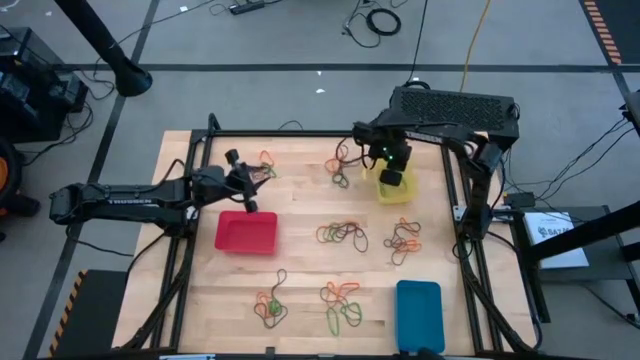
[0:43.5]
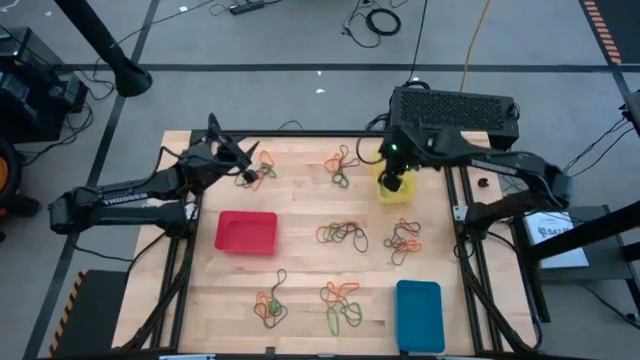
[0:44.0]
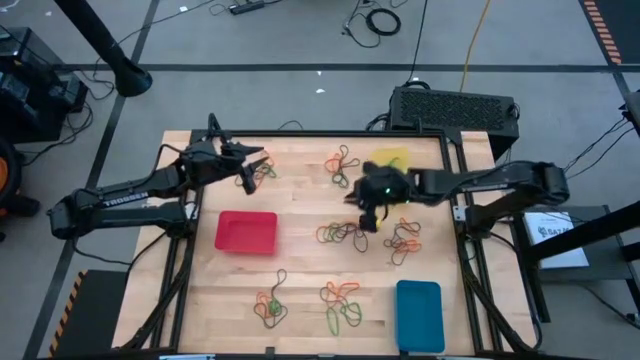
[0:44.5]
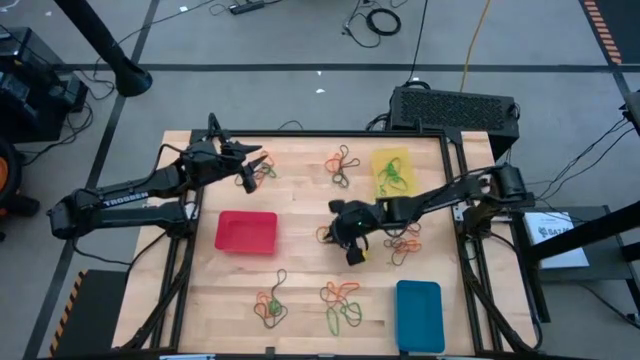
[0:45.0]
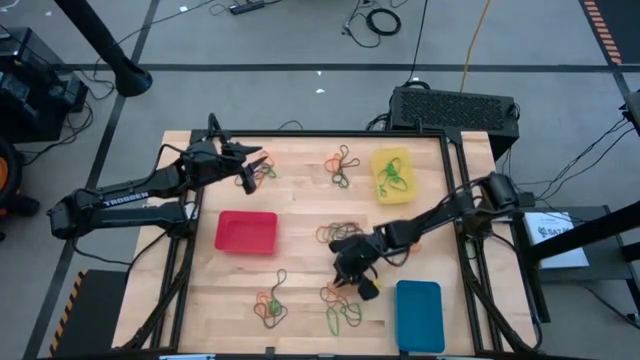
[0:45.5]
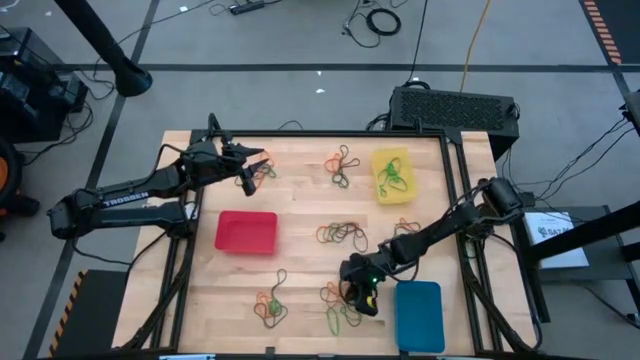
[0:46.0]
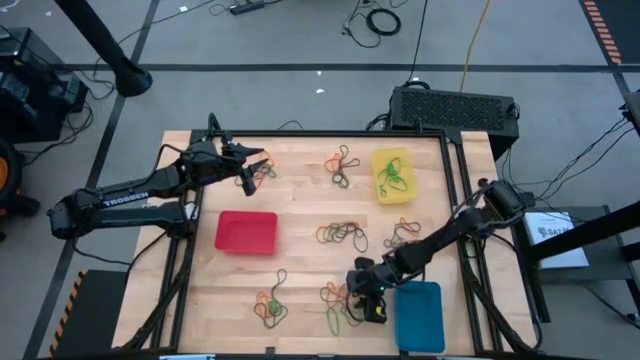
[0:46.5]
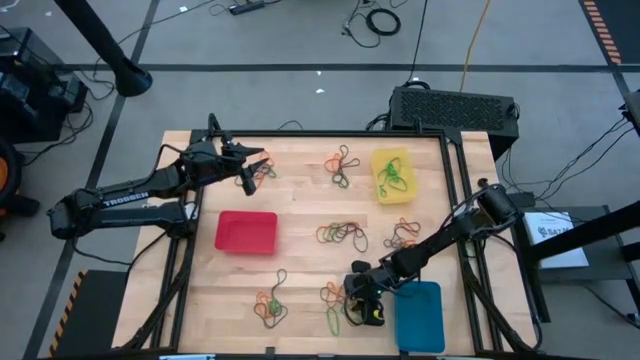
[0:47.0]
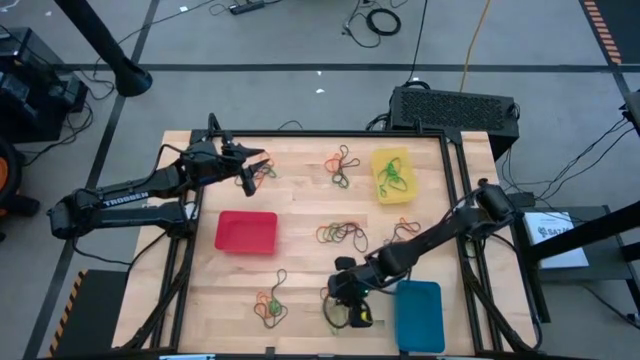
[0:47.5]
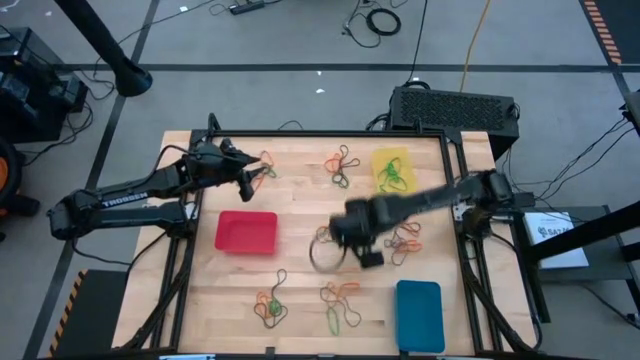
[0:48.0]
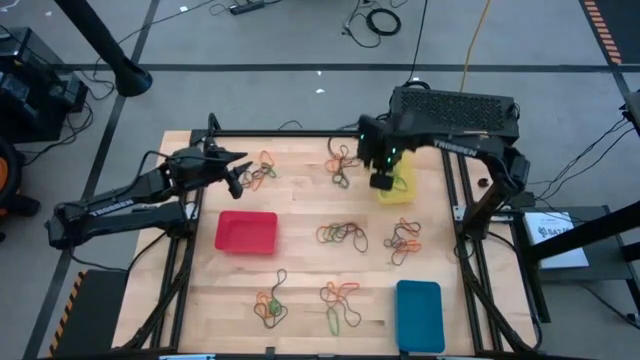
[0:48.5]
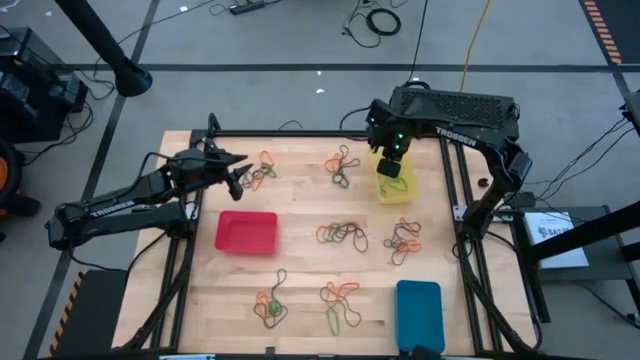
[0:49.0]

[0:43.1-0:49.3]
Task: Sort rubber bands into baskets
Put the green rubber band into the yellow bin

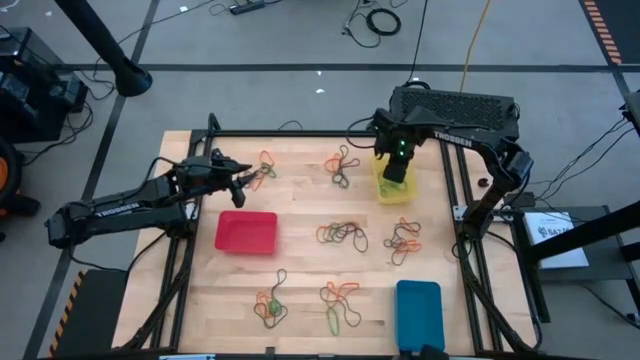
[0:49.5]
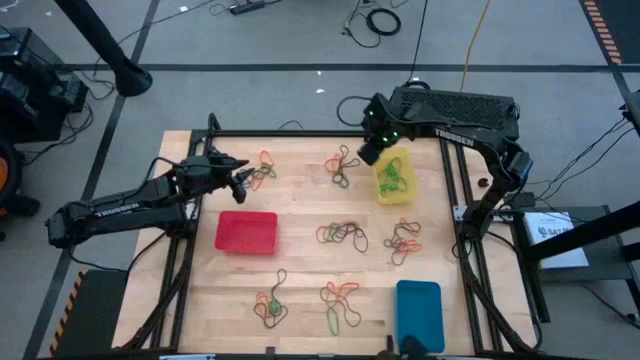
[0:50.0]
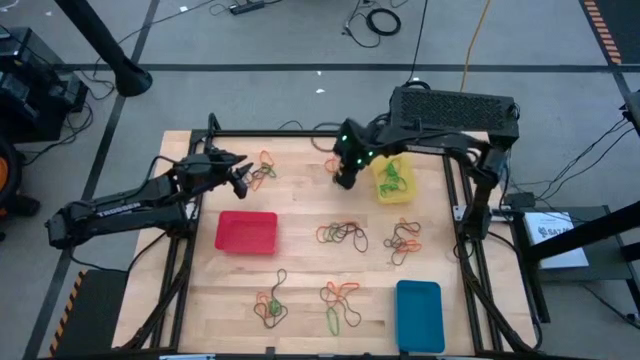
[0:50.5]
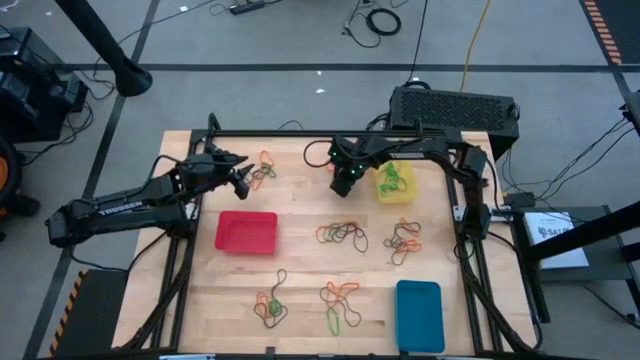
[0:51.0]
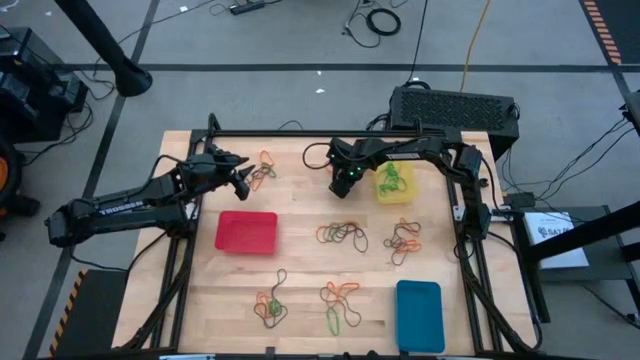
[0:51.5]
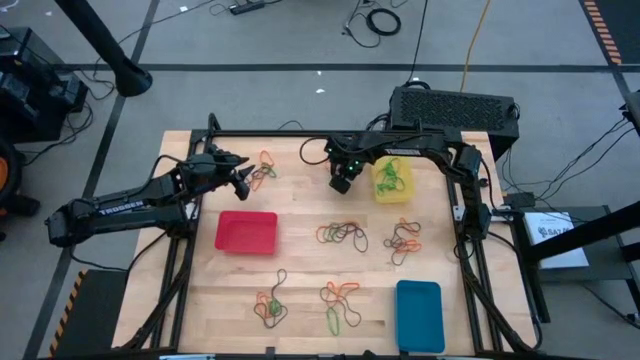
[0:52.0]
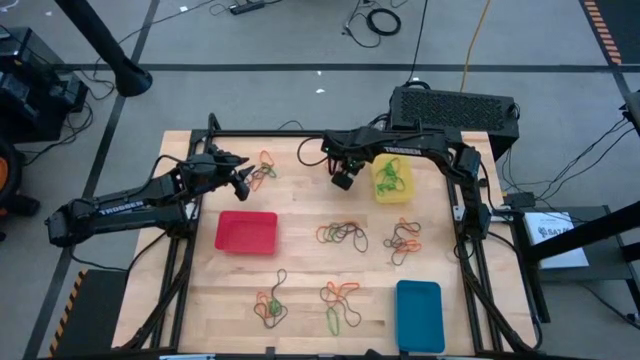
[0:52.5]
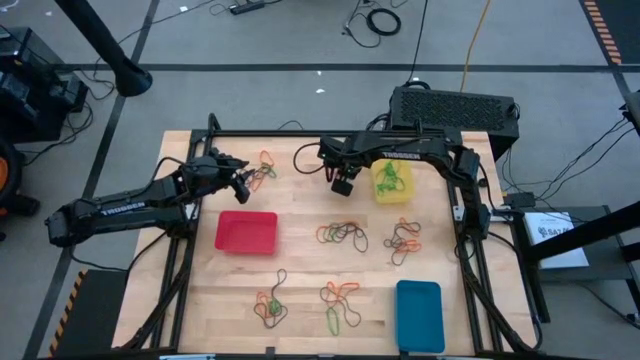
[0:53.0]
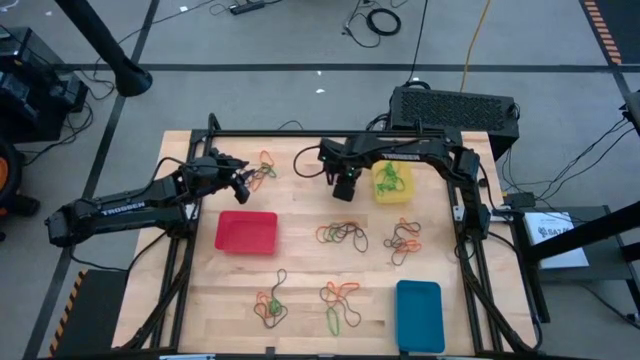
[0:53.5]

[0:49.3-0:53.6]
Put the green rubber band into the yellow bin

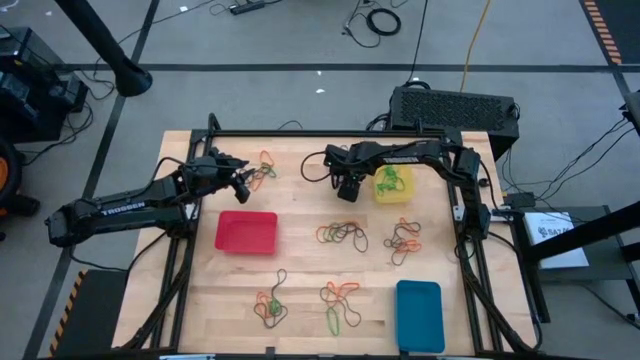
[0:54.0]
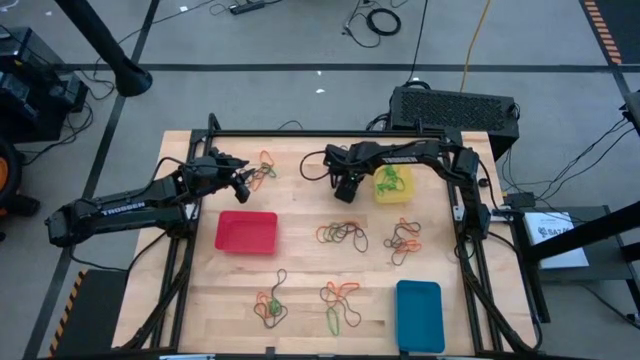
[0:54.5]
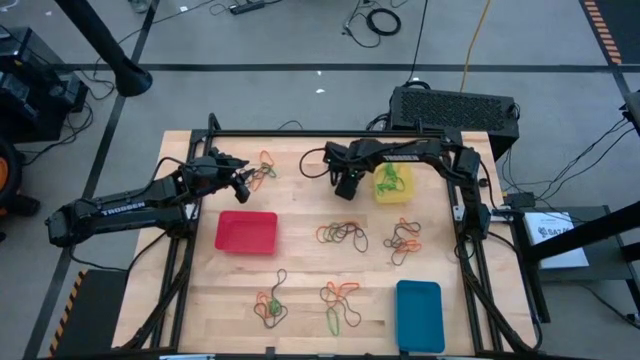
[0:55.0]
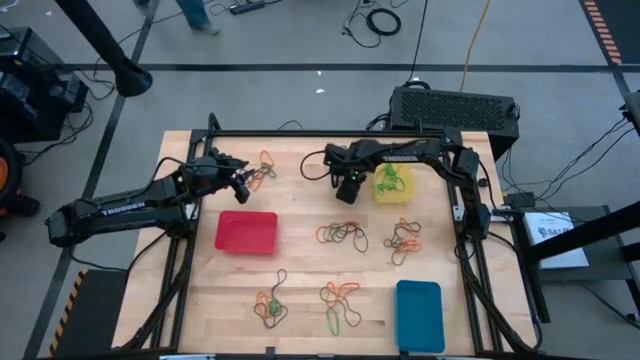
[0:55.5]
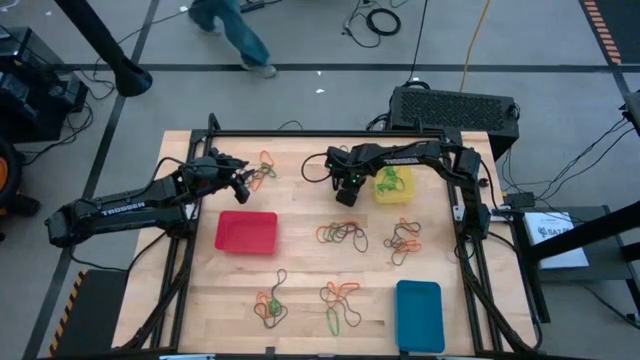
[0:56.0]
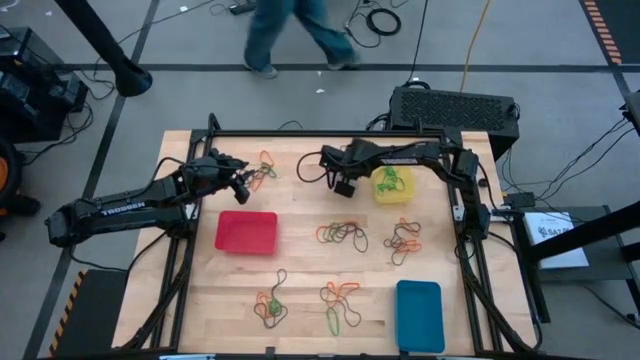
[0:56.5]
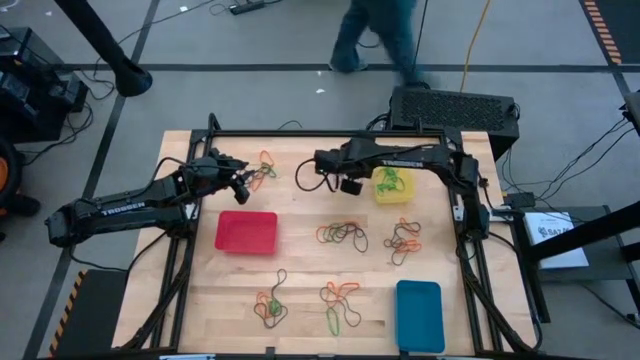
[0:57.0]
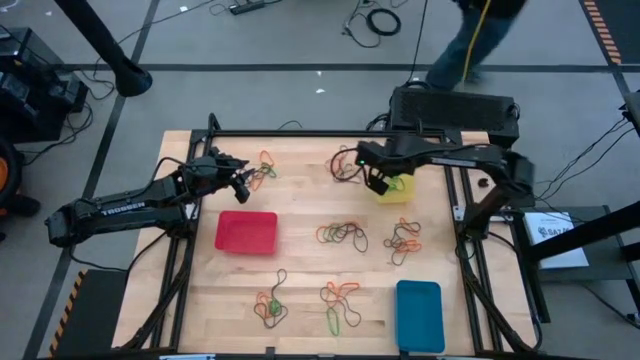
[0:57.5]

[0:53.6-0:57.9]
Put the green rubber band into the yellow bin

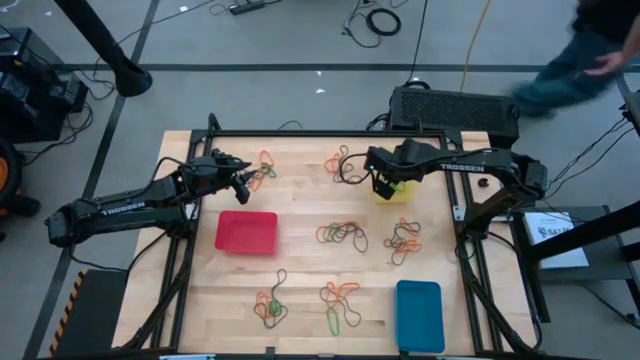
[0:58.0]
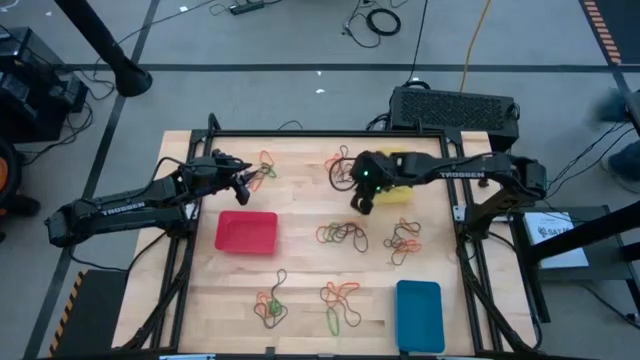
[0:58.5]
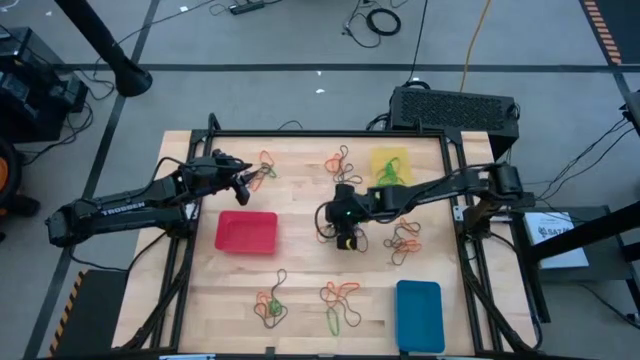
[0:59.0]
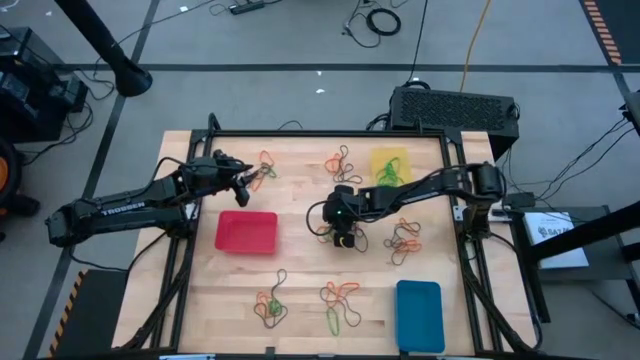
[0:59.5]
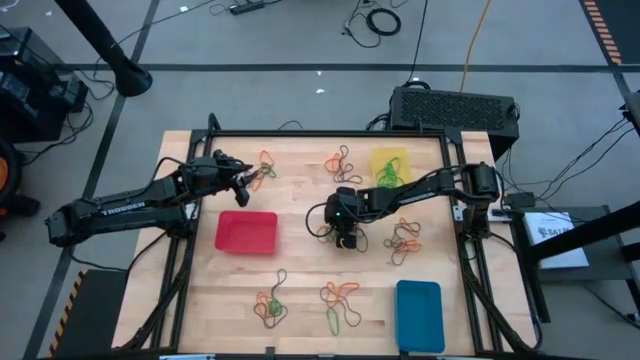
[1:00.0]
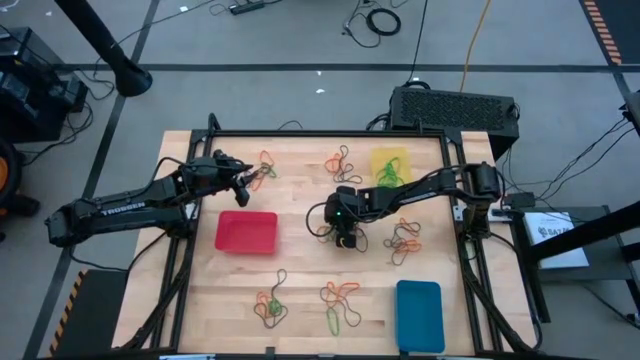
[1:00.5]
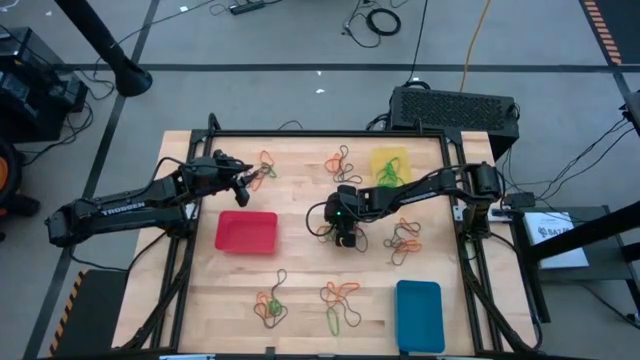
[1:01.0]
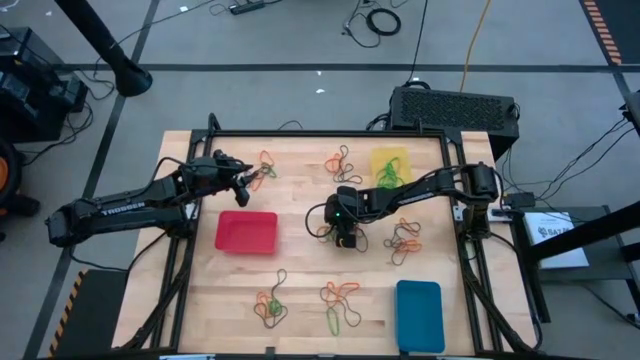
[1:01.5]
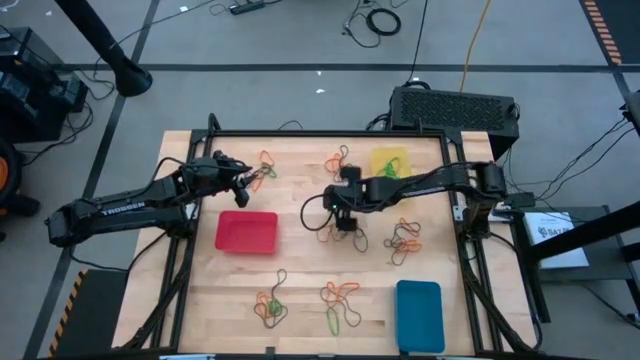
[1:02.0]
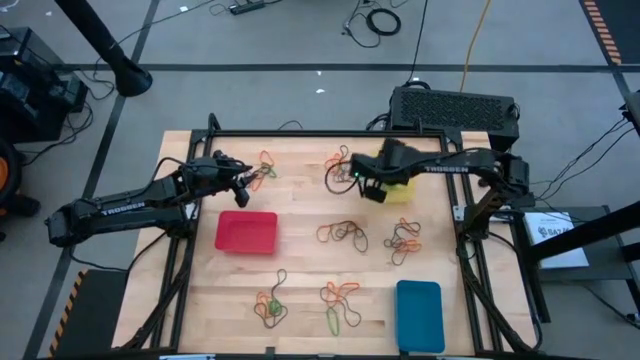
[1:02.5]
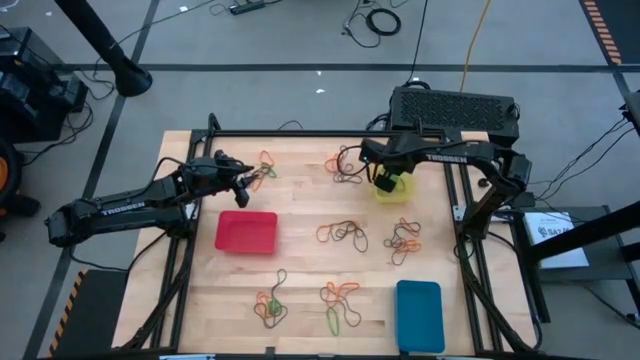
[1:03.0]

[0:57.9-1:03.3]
Put the green rubber band into the yellow bin
